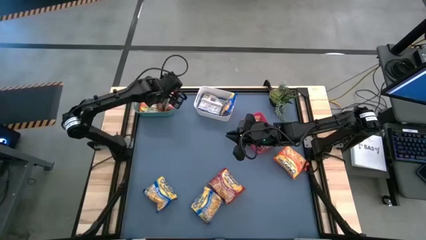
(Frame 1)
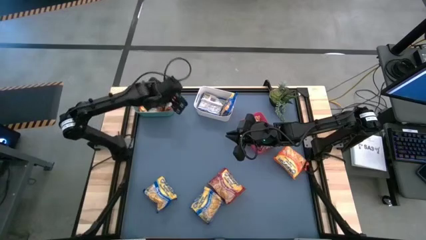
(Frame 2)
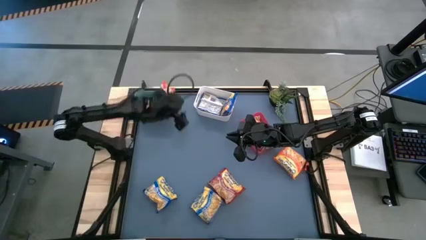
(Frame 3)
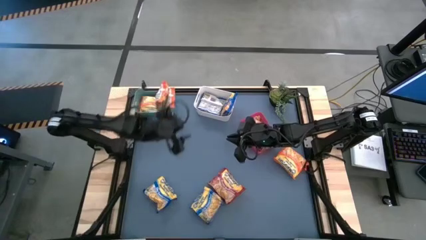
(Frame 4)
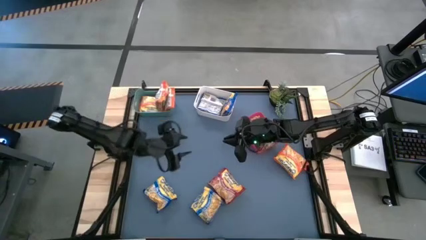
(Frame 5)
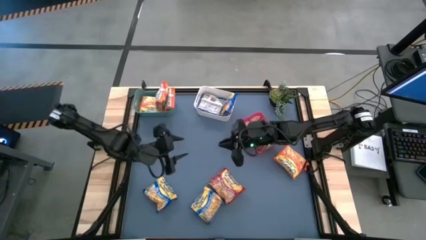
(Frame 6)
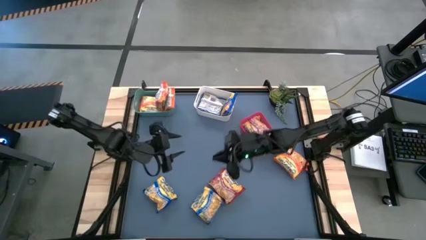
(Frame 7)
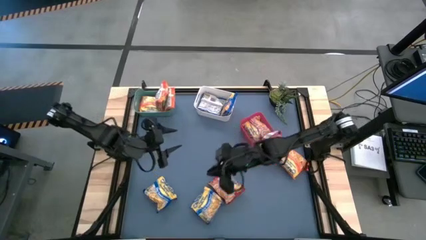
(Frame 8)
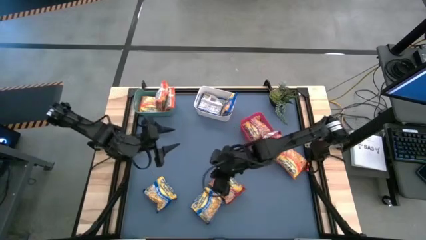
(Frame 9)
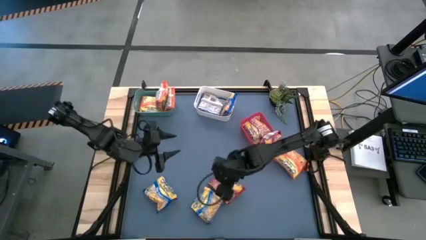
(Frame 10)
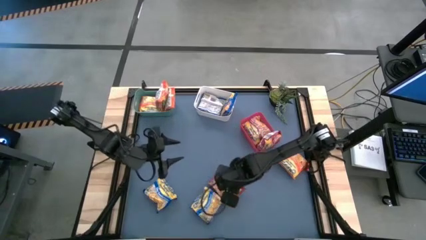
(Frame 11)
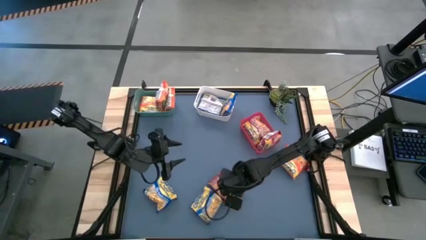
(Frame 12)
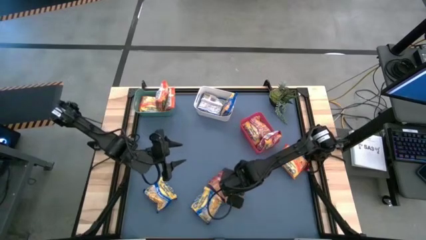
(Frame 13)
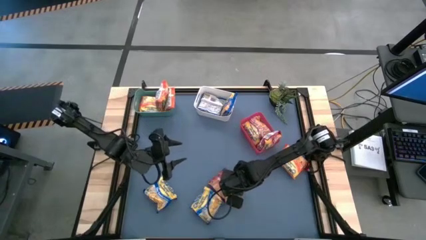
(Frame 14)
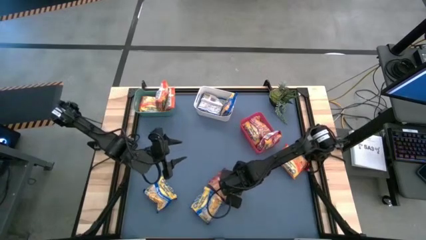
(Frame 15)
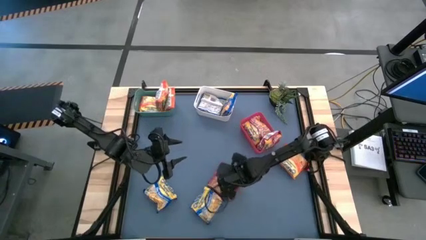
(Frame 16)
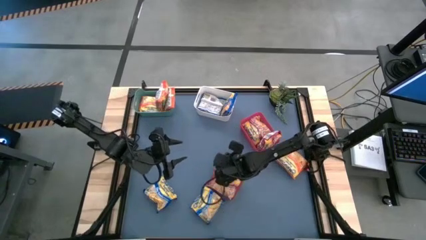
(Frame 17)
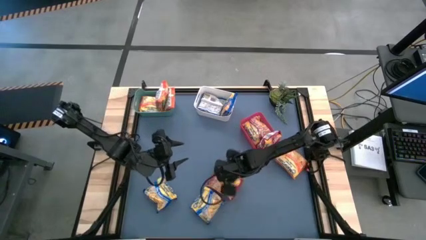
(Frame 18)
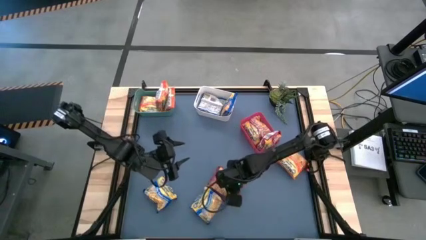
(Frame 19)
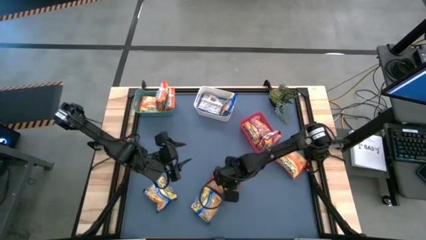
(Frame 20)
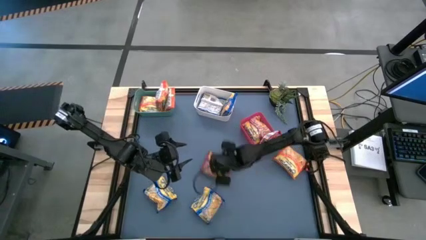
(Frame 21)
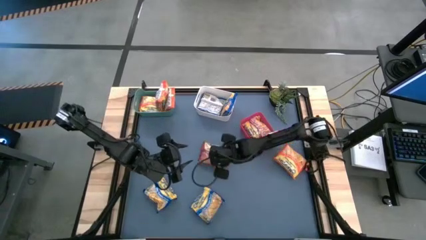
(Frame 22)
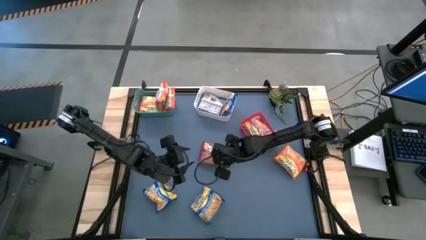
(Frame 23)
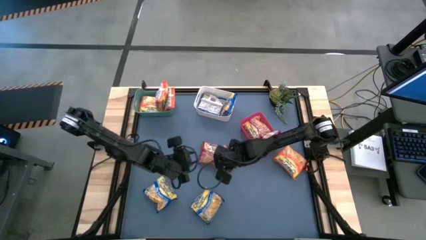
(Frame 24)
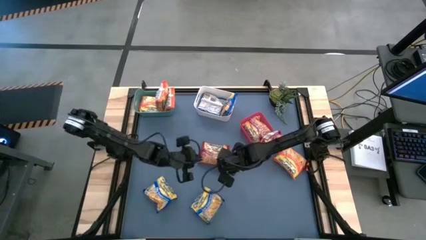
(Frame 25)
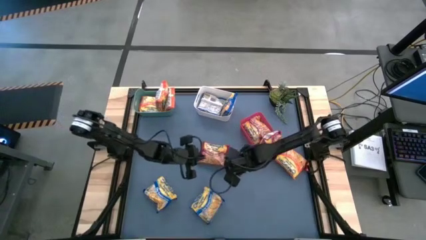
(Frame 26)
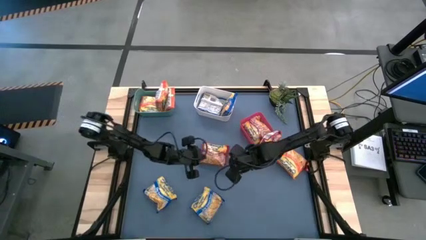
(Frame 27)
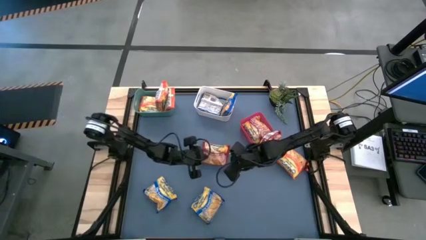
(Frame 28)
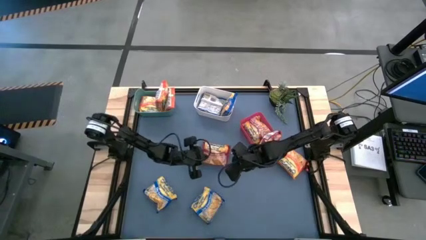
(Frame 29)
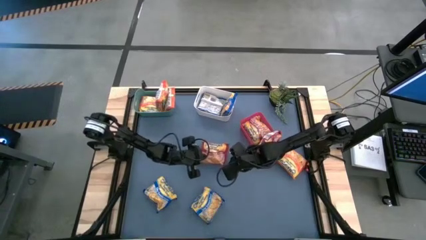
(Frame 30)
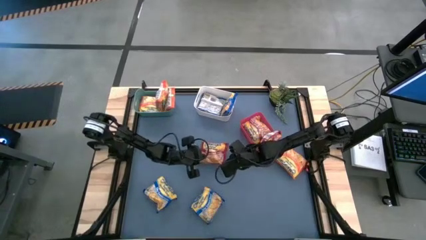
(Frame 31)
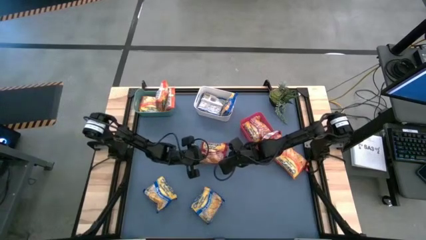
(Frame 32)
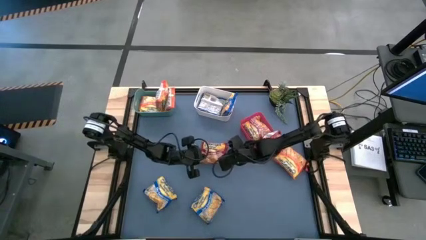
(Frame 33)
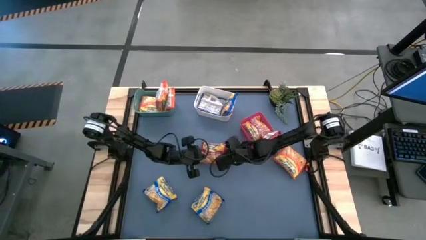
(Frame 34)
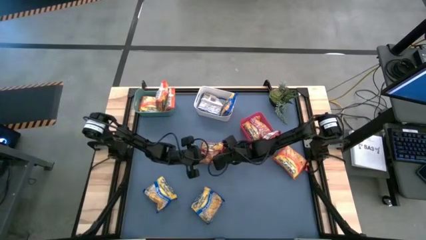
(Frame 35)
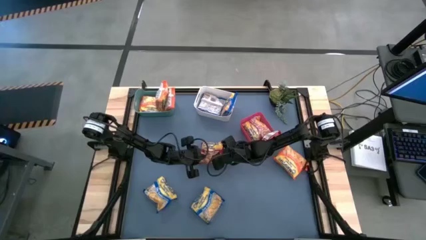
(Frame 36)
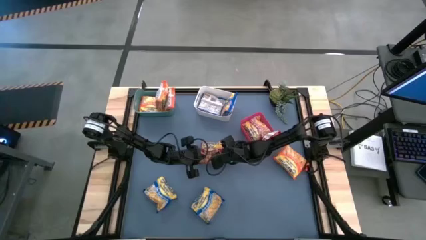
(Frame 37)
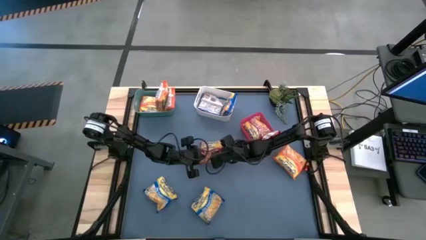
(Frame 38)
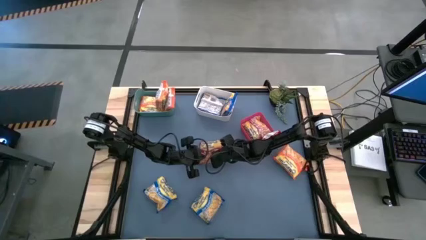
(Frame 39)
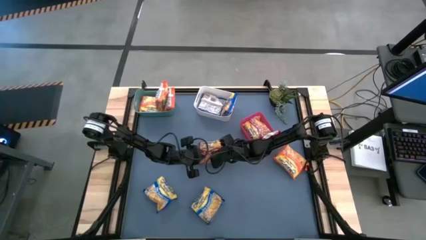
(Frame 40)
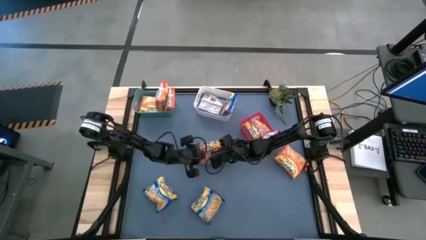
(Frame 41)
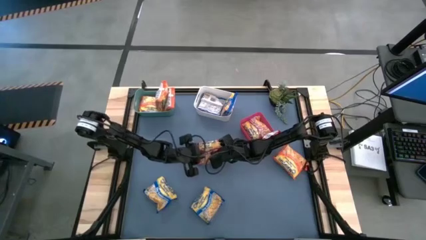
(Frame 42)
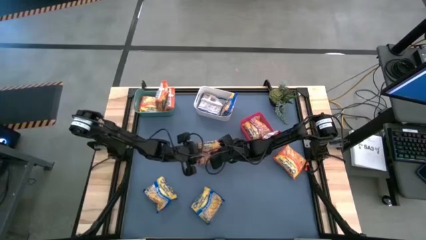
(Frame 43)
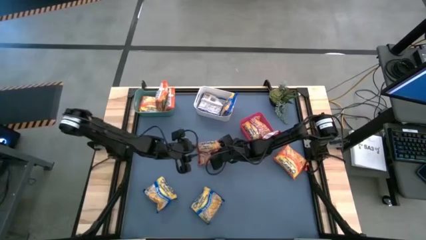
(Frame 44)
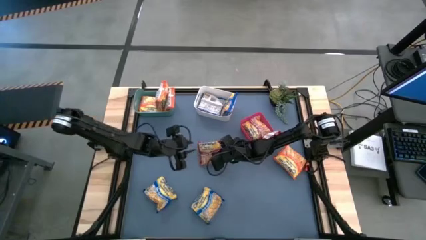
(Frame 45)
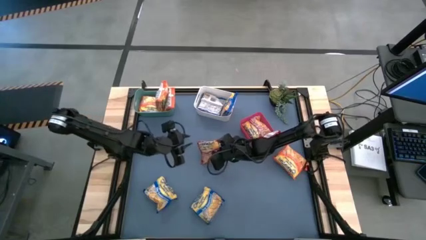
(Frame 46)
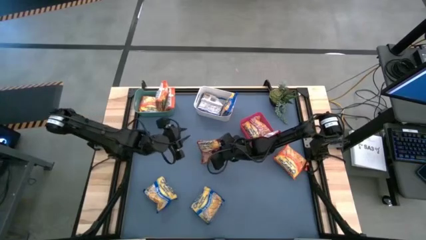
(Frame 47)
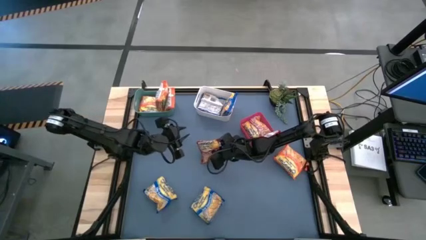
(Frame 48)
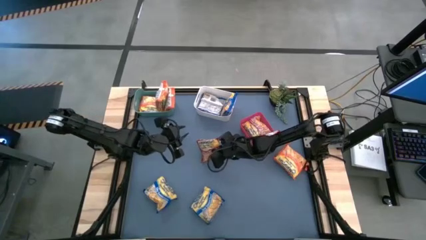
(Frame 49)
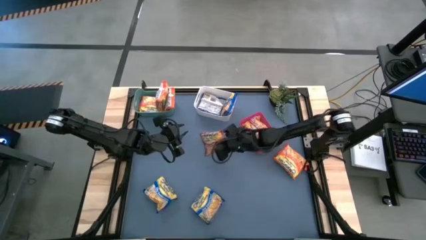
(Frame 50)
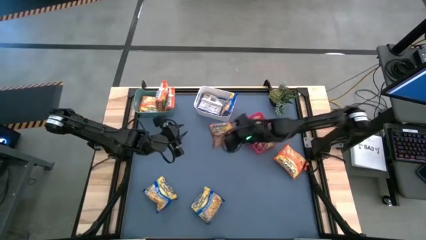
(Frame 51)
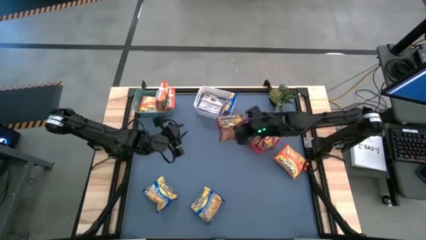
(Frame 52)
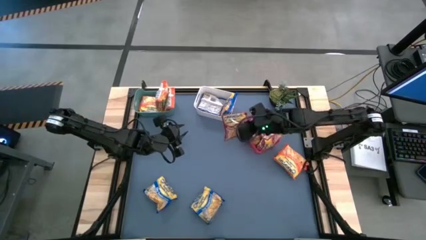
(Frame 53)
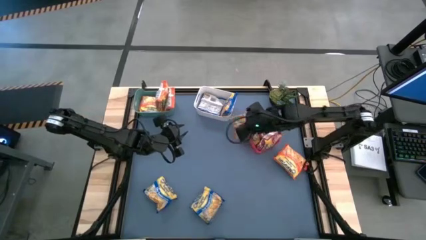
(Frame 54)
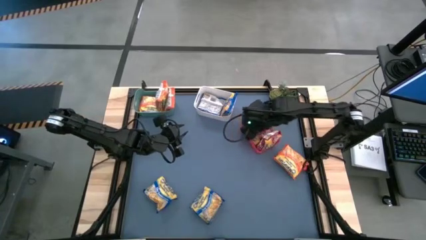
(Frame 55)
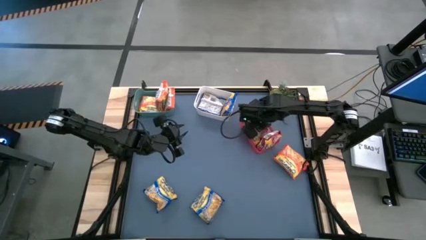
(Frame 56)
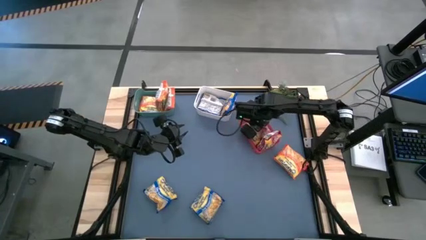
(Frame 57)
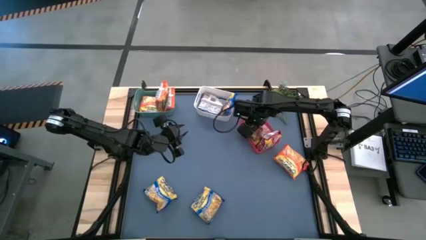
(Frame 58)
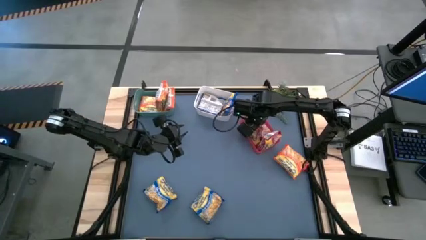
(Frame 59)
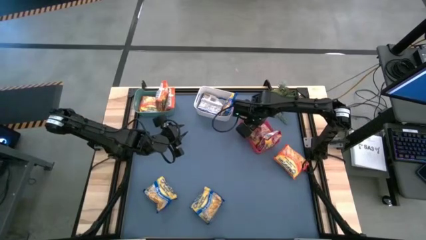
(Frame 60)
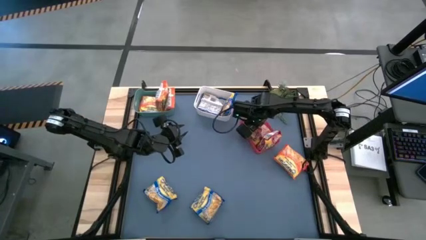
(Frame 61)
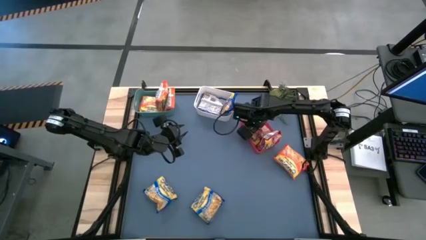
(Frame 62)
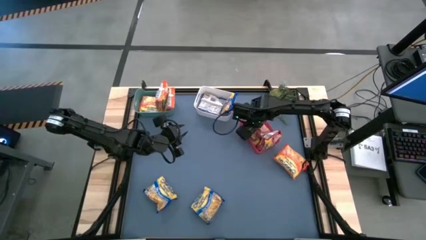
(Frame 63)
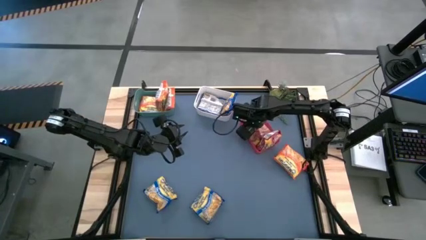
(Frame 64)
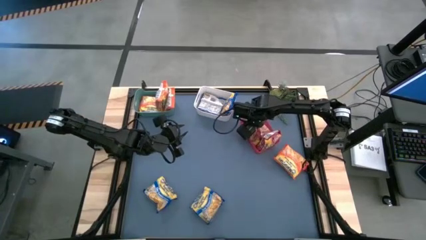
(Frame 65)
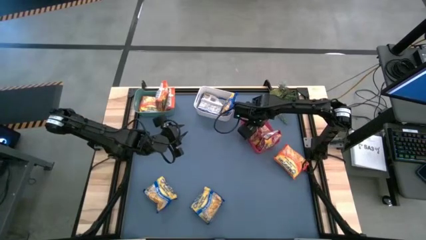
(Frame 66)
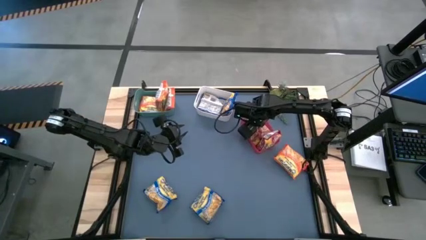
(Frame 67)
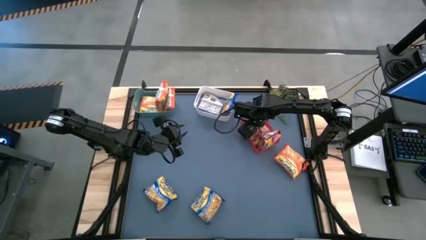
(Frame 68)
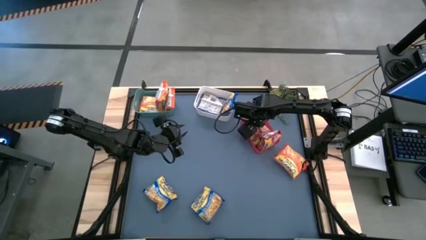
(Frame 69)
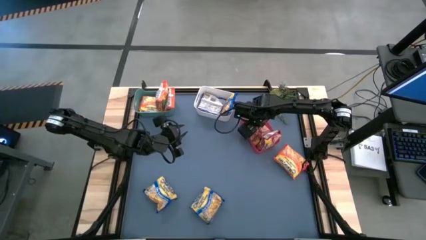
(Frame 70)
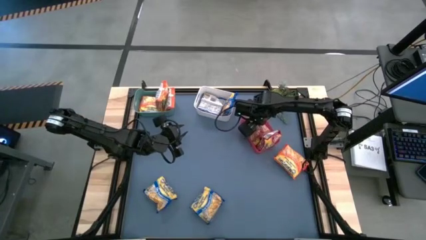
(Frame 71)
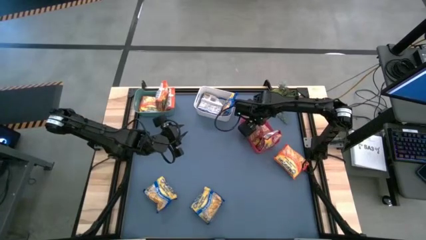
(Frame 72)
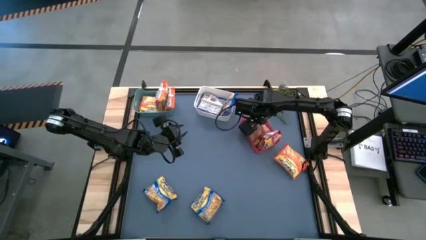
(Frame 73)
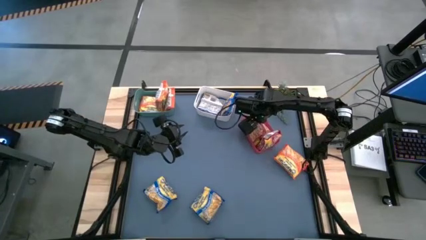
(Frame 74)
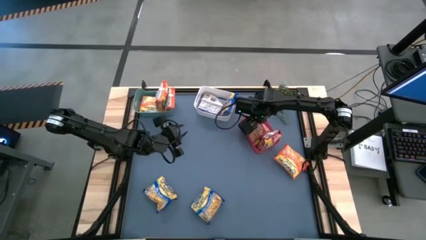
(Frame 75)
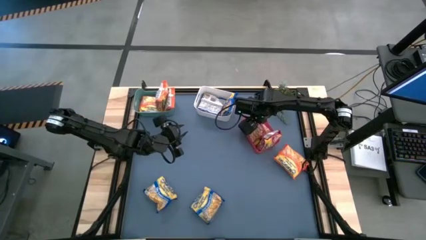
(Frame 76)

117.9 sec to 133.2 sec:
Task: Sort Maruchan noodles
Put the red noodle pack into the pink bin

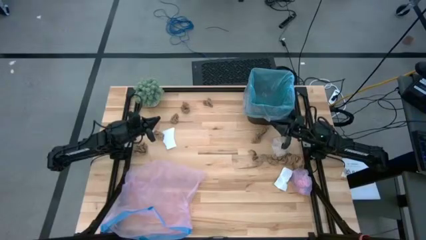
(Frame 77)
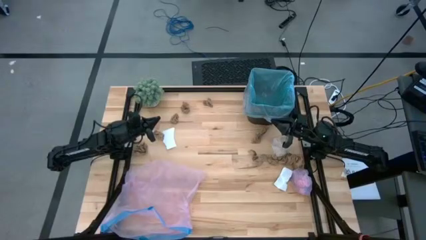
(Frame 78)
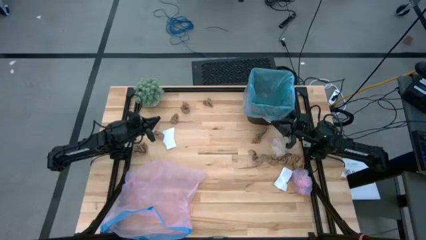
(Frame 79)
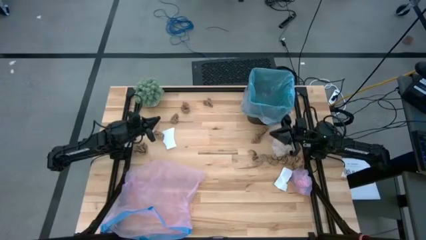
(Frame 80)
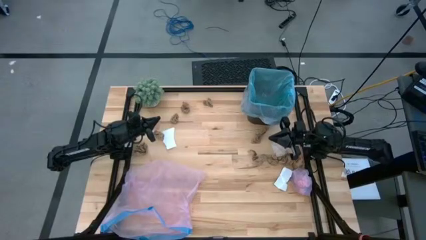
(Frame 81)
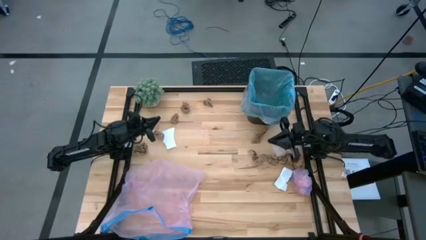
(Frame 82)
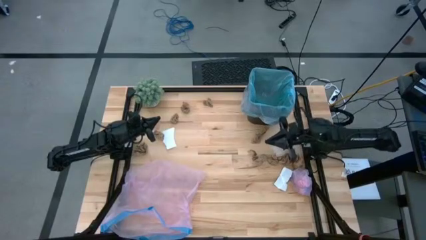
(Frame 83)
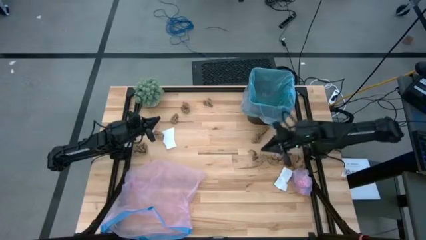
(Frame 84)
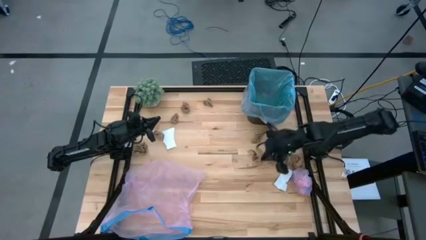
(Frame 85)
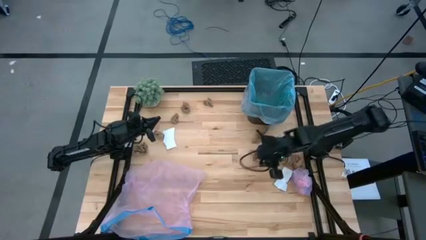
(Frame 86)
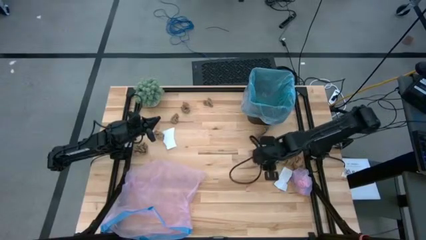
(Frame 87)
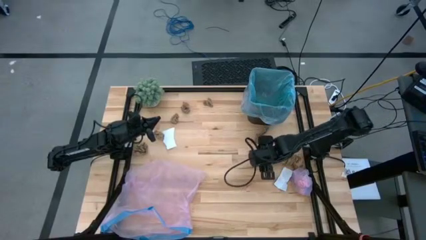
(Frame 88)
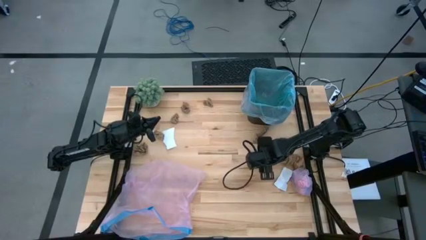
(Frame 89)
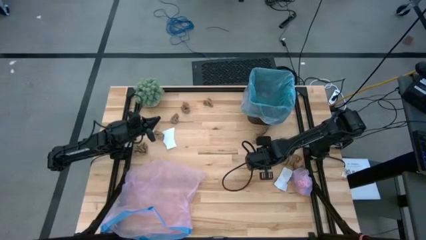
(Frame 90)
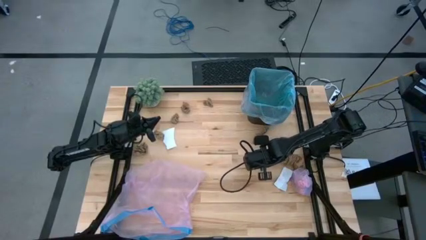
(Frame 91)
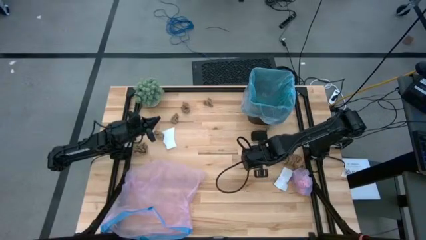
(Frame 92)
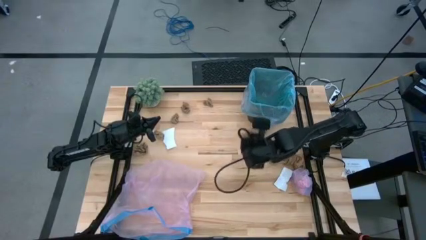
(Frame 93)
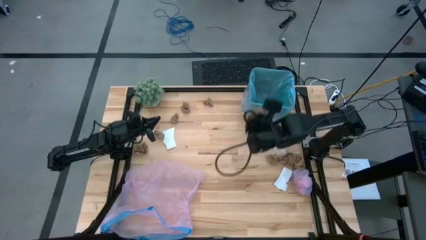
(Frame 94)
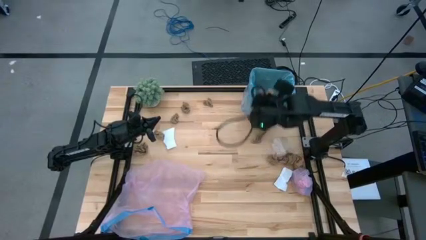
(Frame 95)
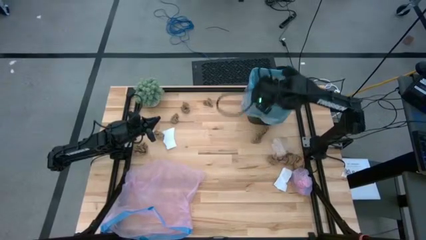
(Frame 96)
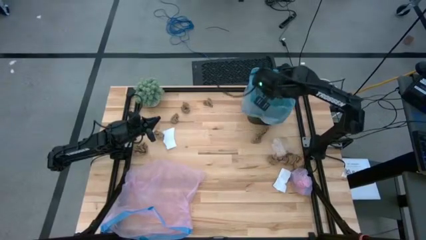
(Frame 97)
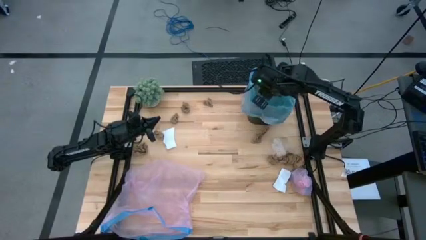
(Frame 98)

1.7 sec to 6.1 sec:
Task: place trash/remove bag and relplace
Put the brown napkin into the trash bin
